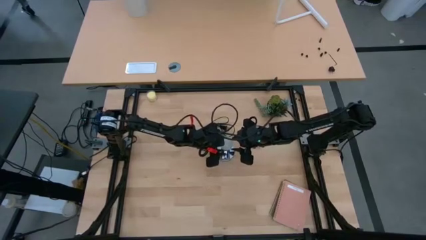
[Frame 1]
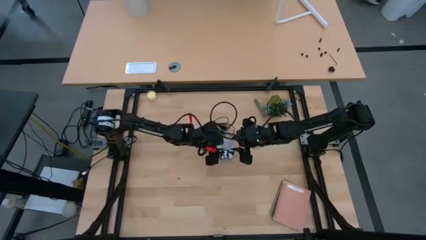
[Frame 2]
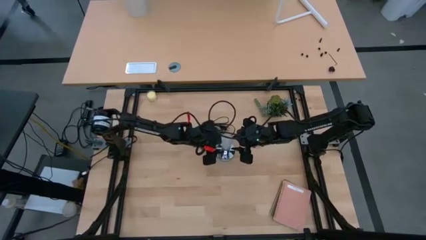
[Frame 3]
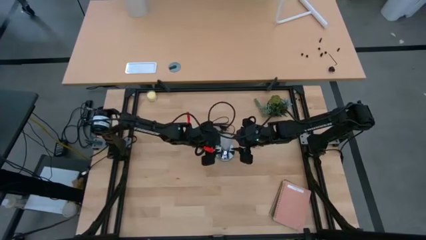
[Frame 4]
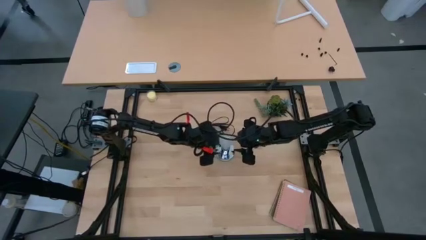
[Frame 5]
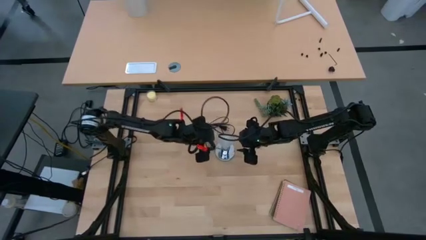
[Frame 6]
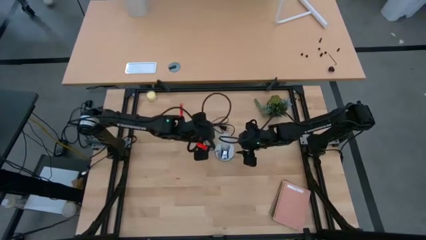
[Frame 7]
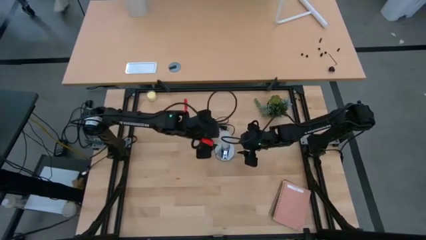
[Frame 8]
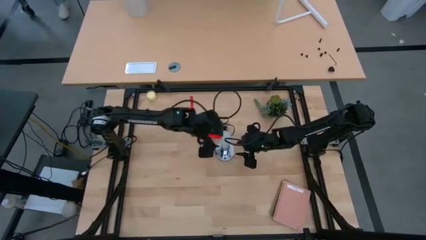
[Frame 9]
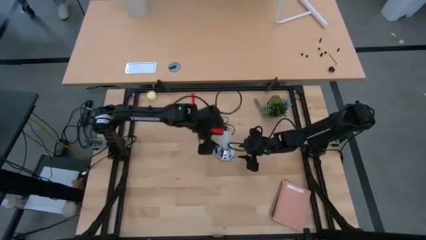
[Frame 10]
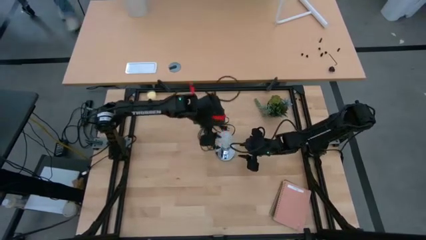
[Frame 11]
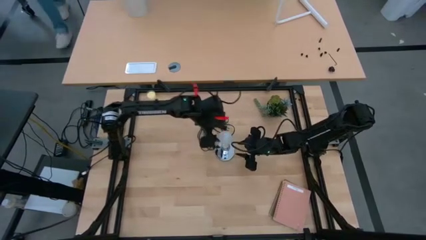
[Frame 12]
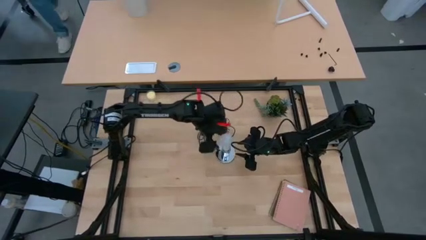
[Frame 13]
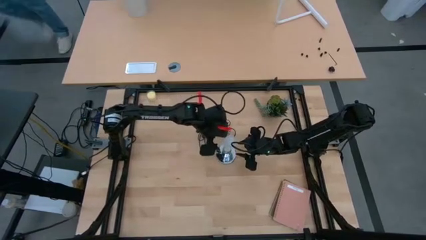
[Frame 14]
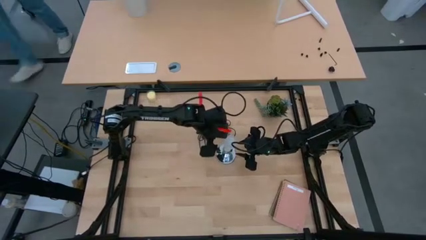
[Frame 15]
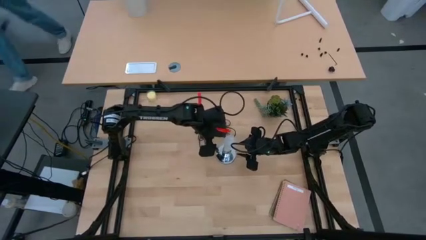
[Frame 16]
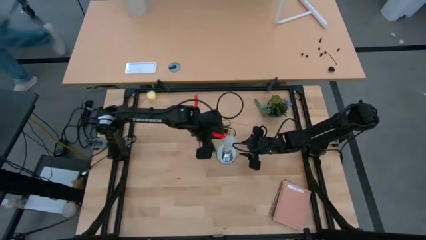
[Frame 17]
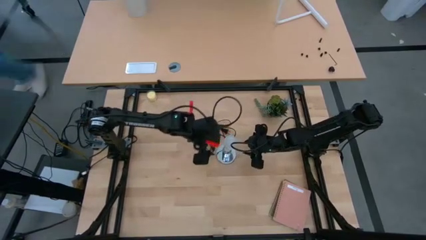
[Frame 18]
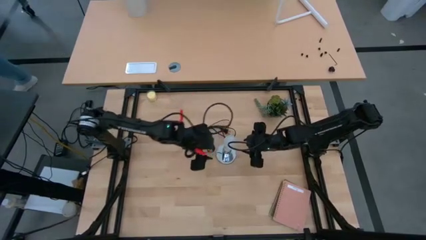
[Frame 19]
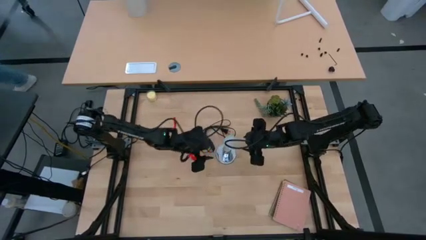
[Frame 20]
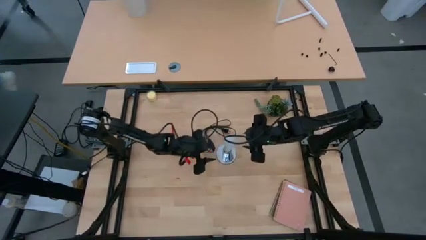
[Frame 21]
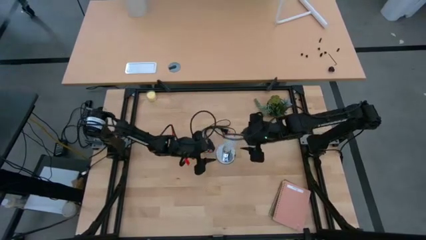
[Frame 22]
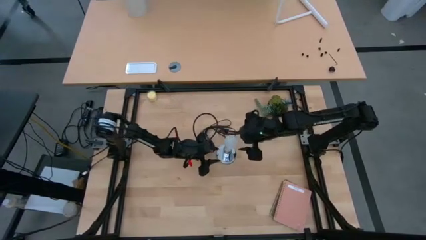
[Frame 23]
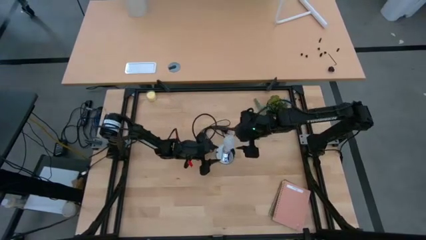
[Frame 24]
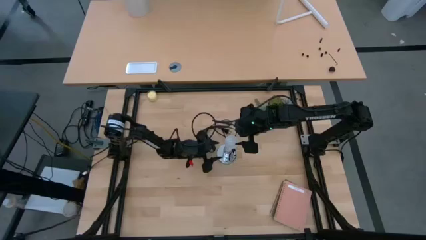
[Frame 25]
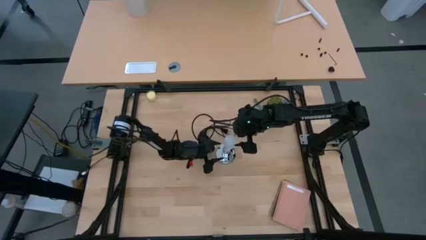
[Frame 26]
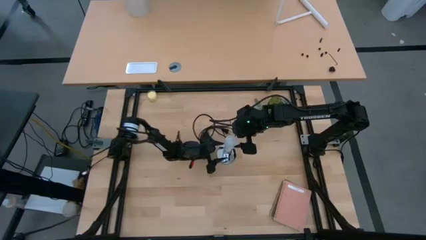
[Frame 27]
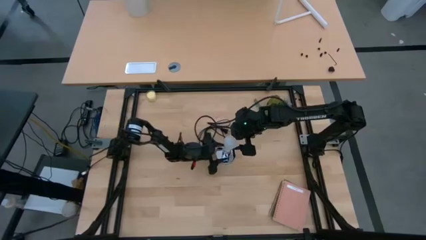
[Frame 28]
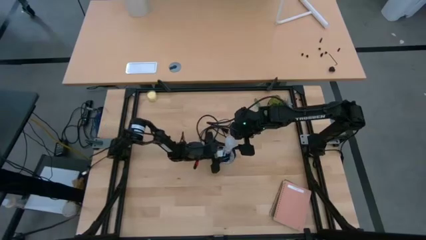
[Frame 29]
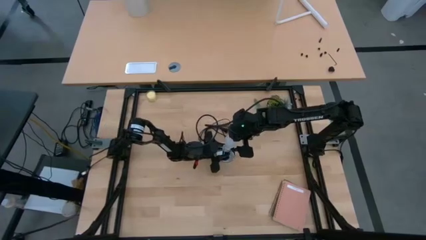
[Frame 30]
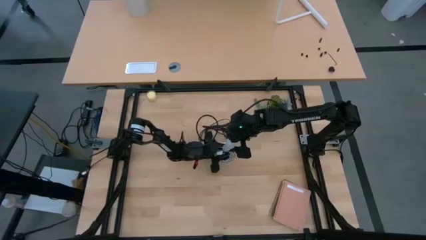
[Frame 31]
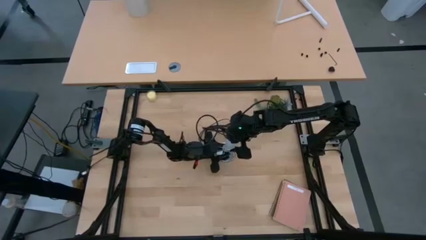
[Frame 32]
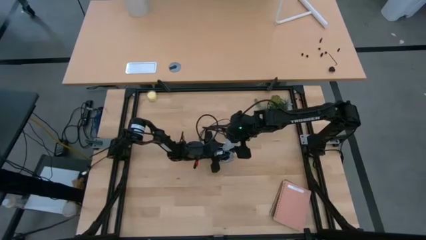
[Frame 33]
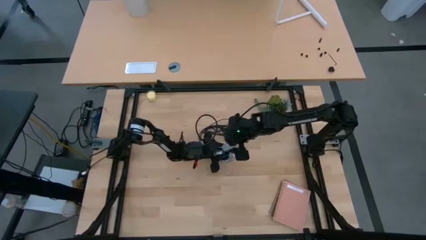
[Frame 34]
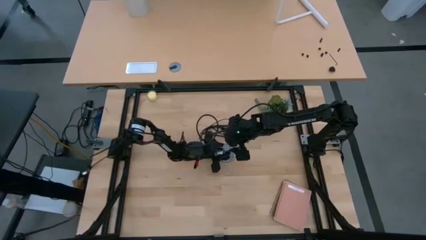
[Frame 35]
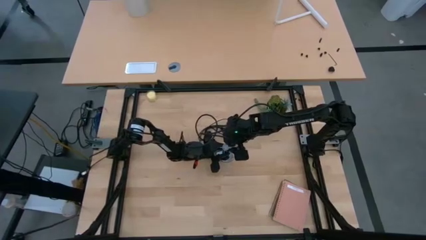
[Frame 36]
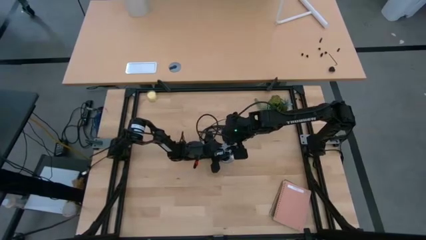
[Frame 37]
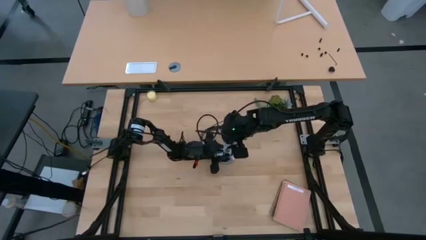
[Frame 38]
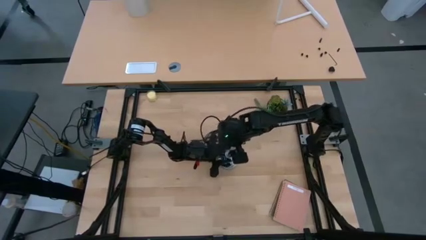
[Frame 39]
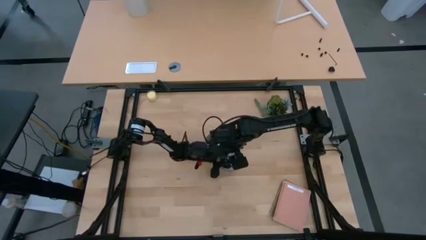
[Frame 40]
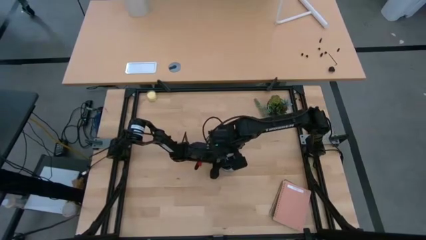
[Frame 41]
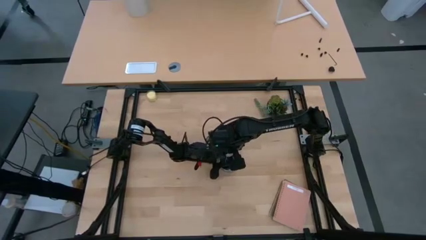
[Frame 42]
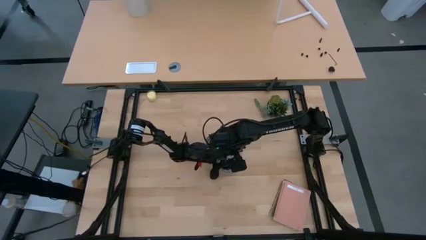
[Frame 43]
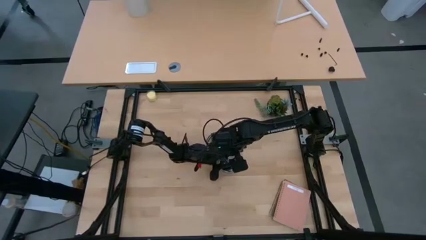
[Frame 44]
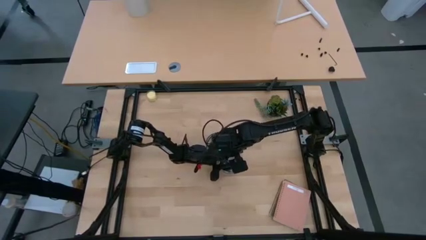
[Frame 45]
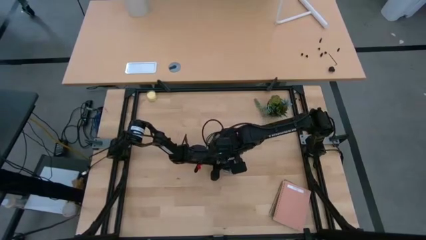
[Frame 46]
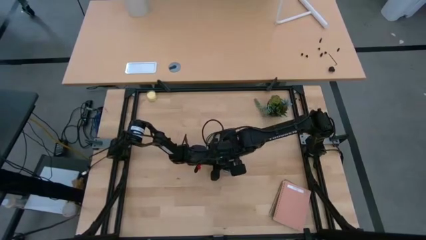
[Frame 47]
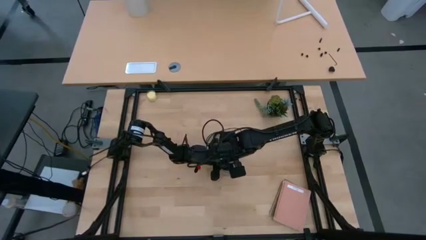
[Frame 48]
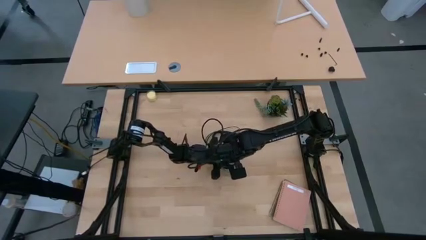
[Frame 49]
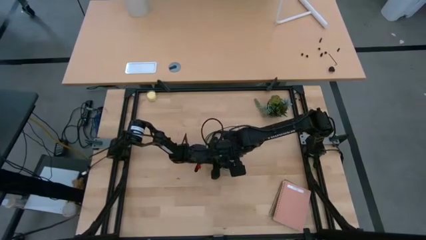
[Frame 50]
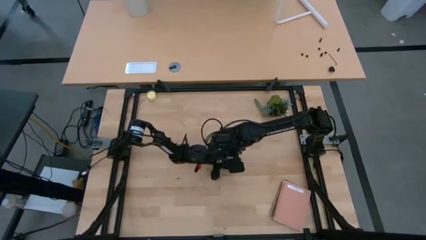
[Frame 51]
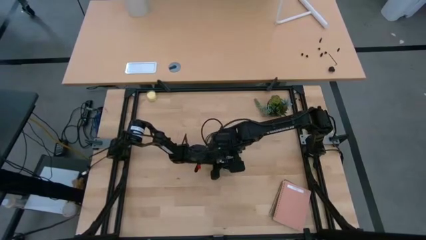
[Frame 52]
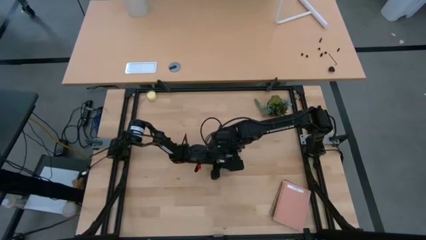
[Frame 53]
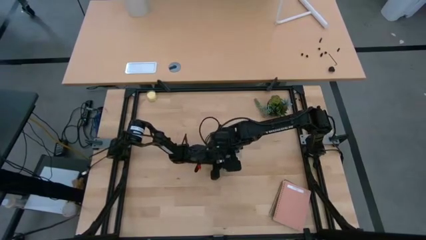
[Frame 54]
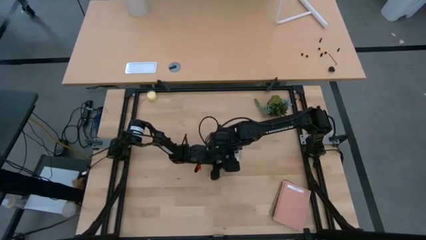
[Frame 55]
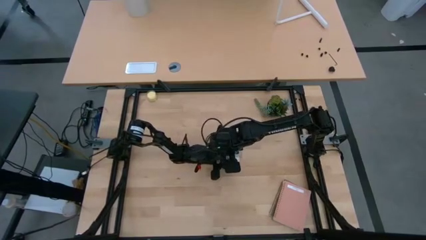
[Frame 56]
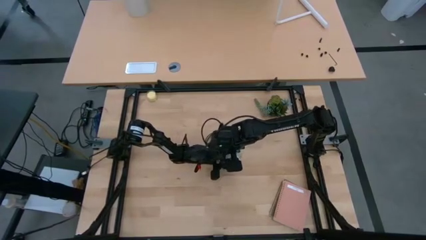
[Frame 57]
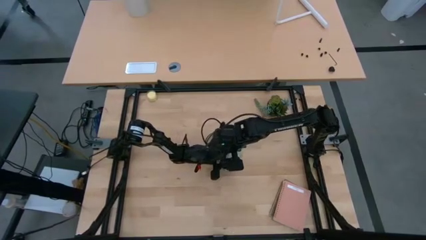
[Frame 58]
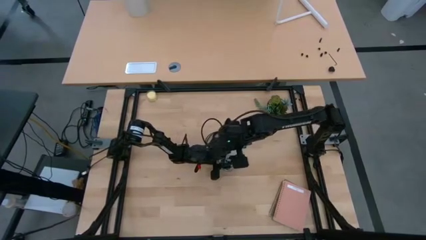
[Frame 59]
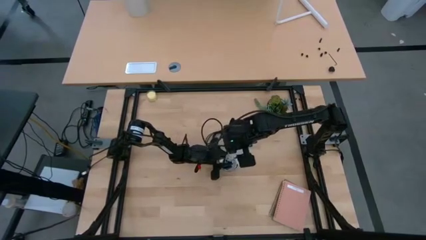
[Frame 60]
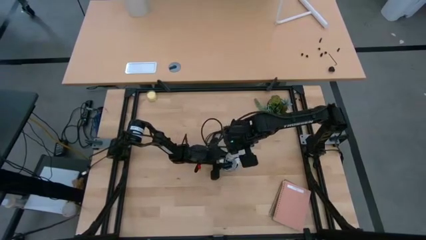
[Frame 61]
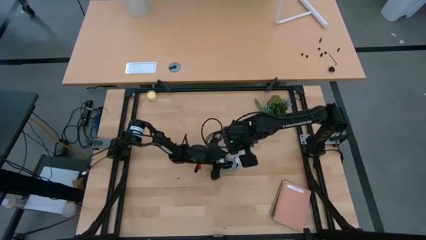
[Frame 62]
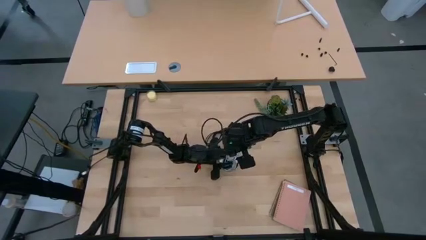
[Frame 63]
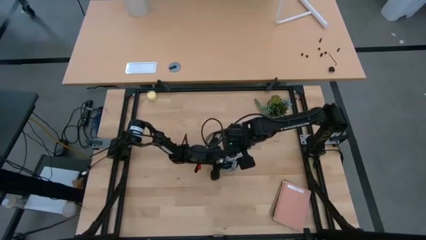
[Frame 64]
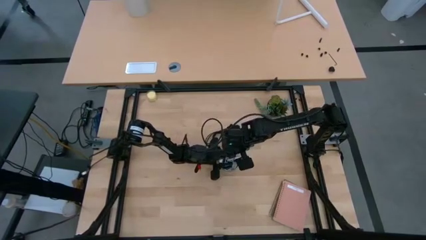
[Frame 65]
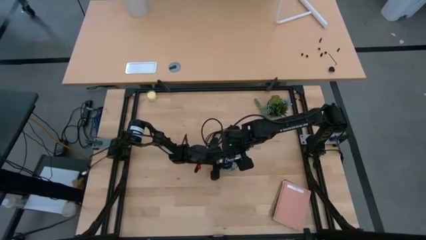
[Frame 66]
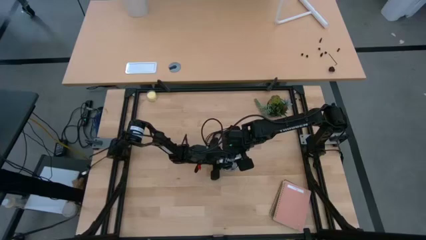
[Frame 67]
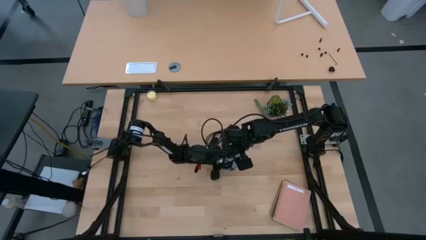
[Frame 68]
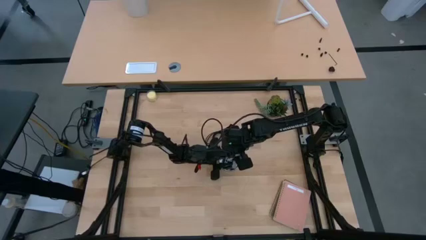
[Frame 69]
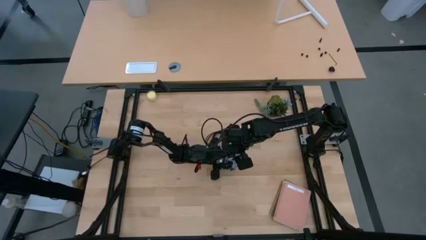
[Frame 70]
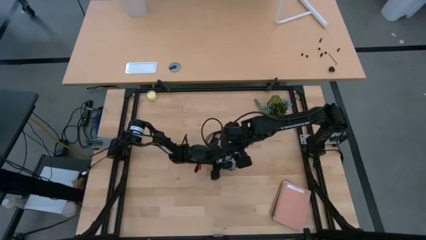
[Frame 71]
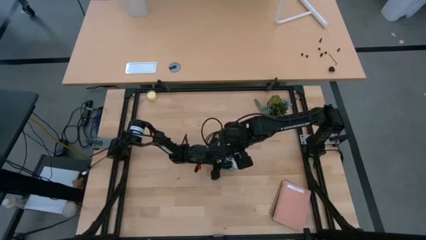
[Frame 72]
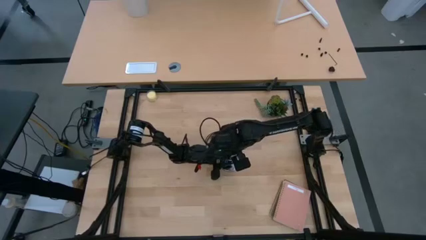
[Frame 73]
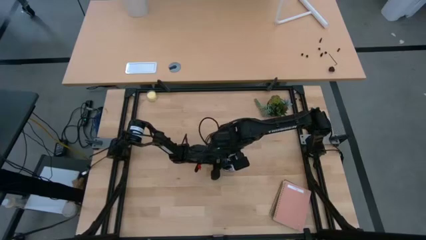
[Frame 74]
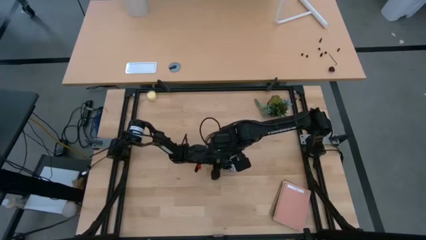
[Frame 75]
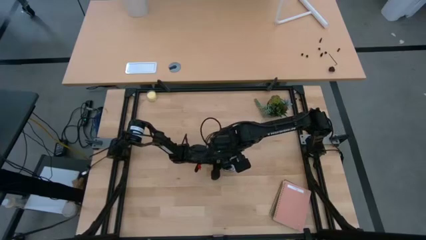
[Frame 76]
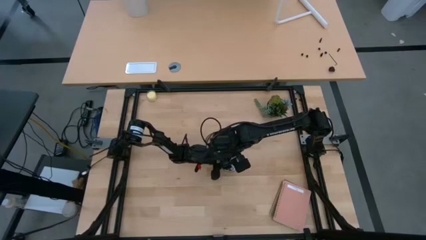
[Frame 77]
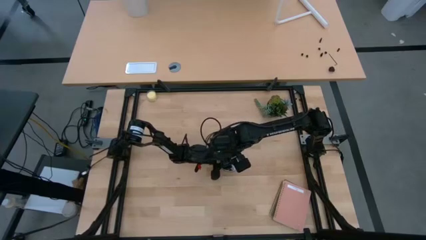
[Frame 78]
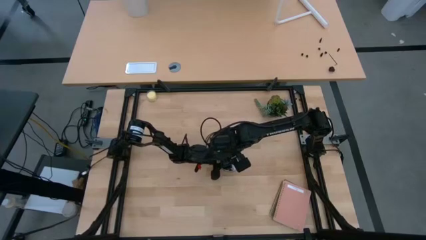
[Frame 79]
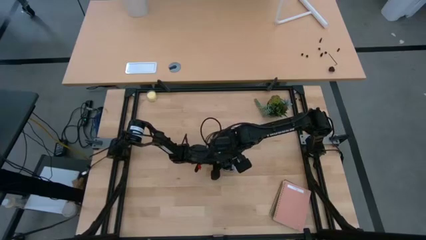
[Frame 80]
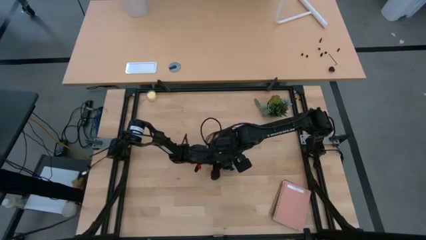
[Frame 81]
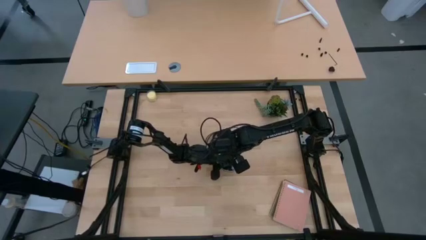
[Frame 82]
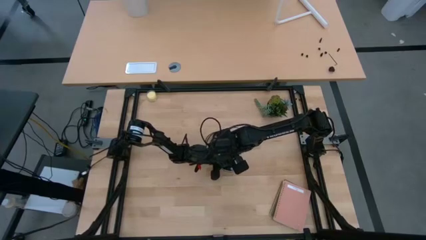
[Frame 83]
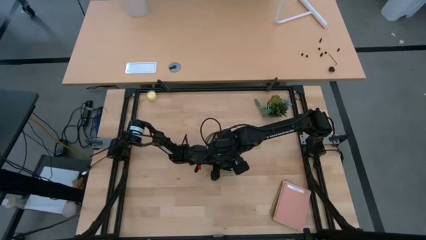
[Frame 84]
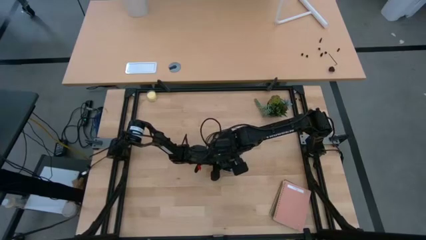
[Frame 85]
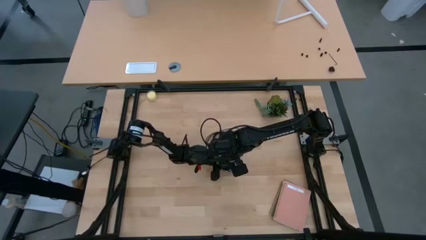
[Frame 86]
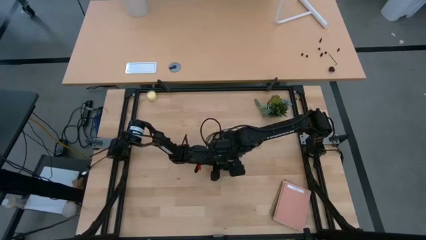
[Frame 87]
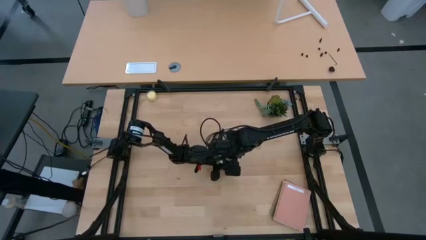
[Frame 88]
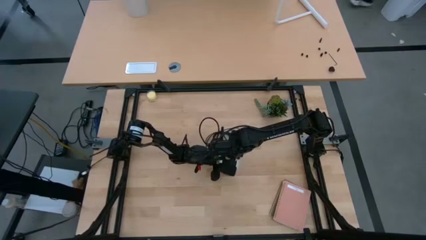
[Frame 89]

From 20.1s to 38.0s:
Task: Screw lightbulb
Insert the white lightbulb into the lamp
